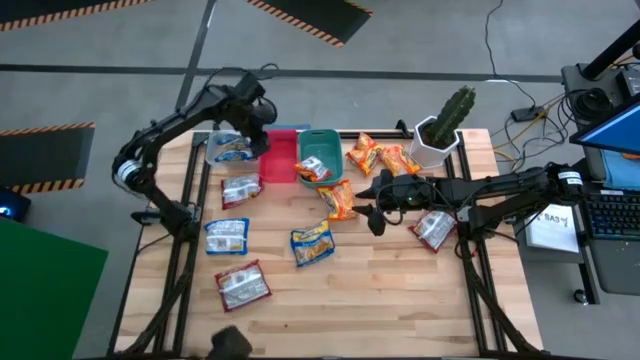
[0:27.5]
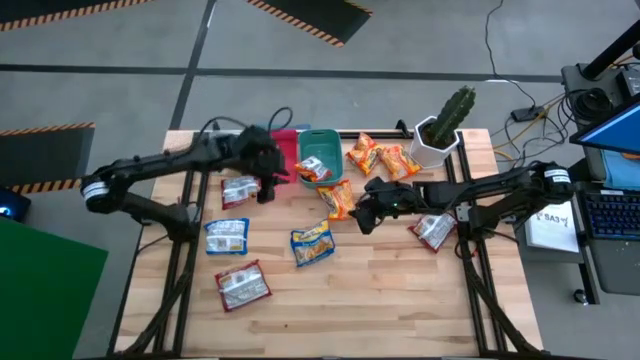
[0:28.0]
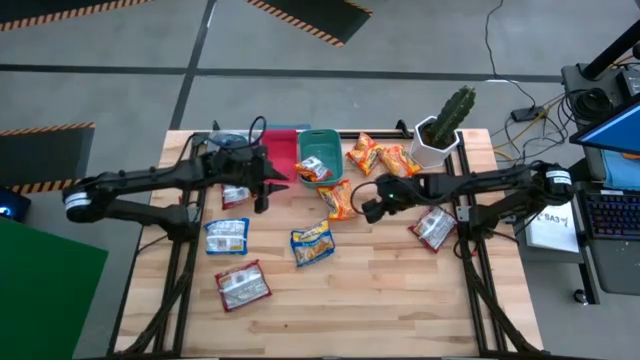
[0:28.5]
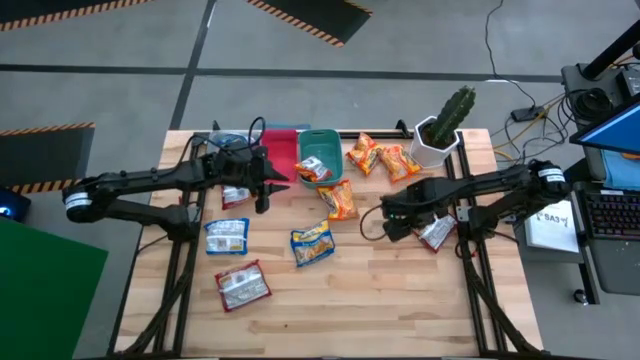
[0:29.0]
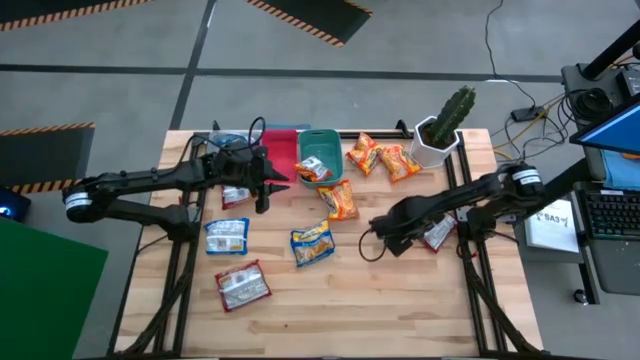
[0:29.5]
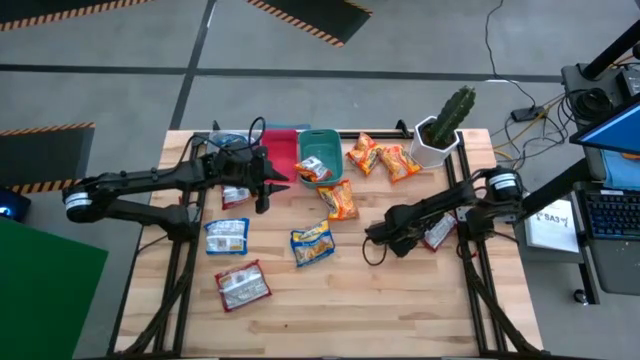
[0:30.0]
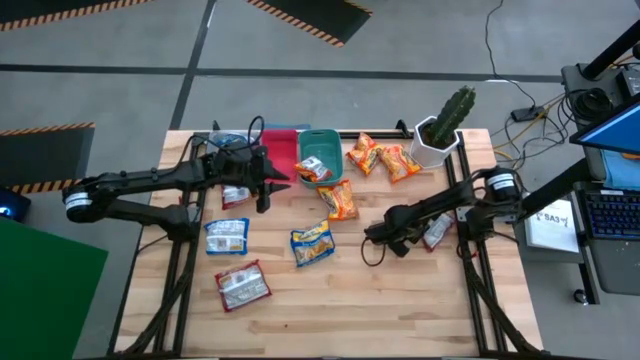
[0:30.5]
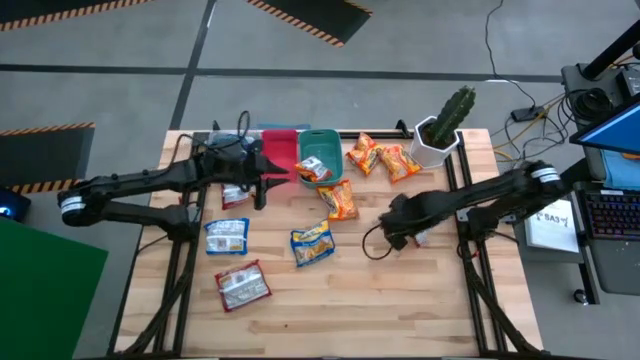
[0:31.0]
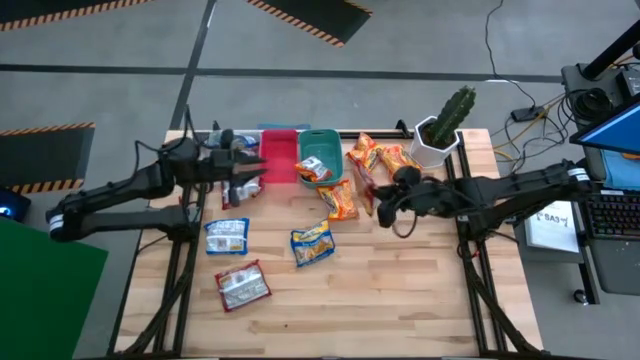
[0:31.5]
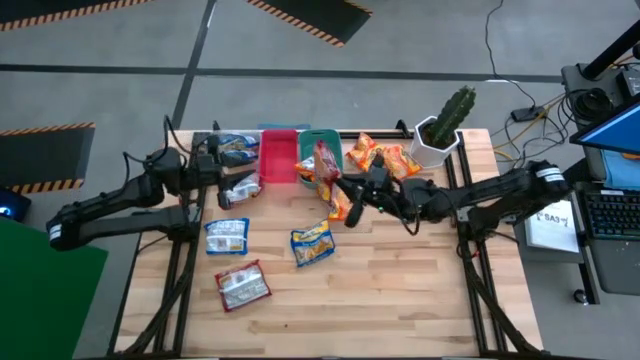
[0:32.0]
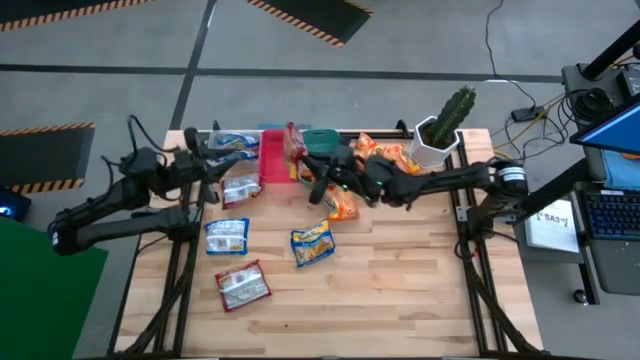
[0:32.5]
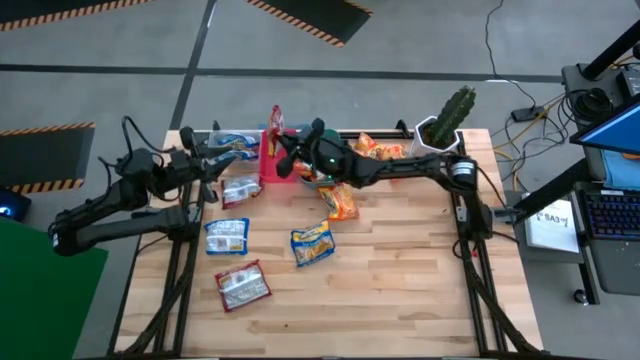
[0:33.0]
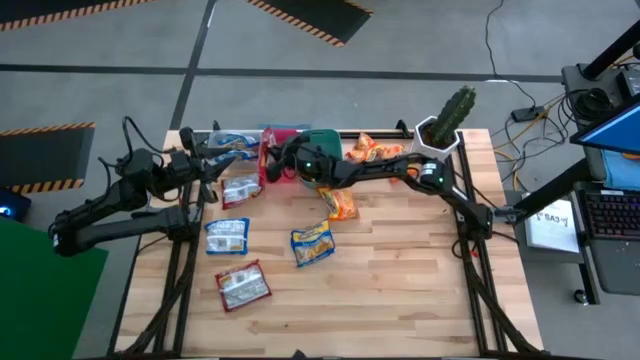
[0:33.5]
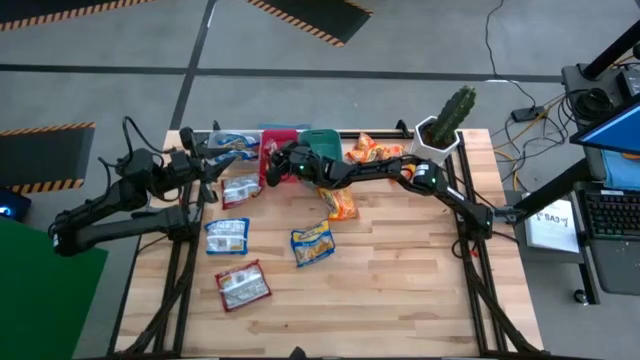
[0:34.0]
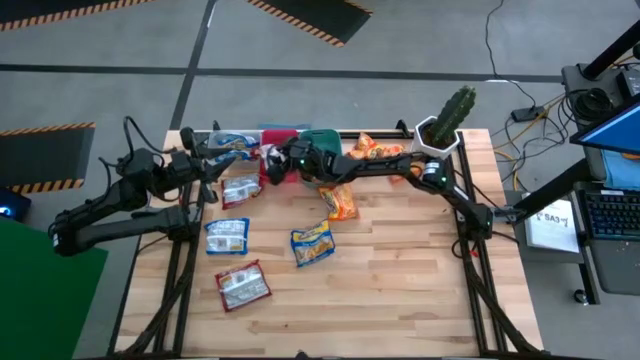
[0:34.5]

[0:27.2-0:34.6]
Task: Sort Maruchan noodles
Put the red noodle pack into the red bin

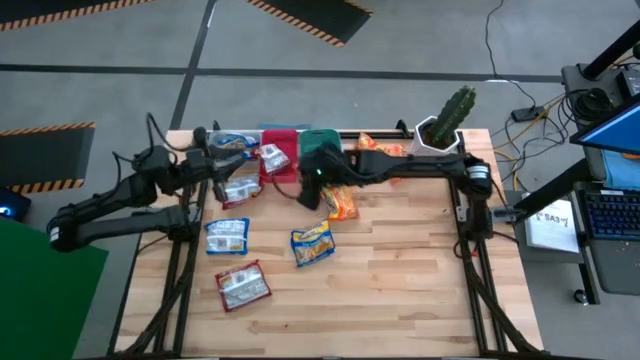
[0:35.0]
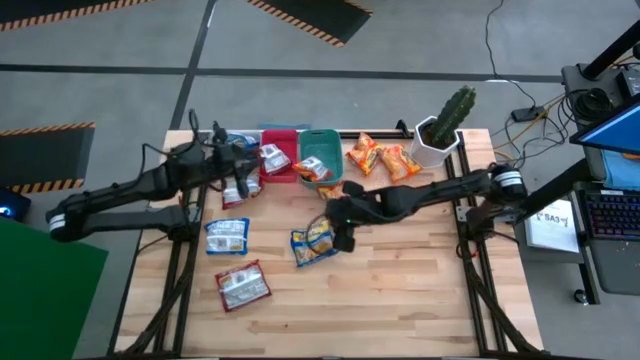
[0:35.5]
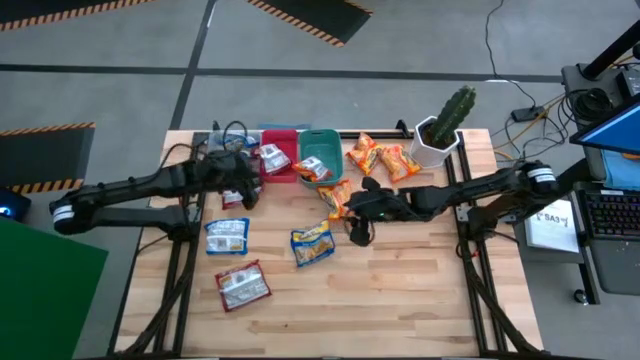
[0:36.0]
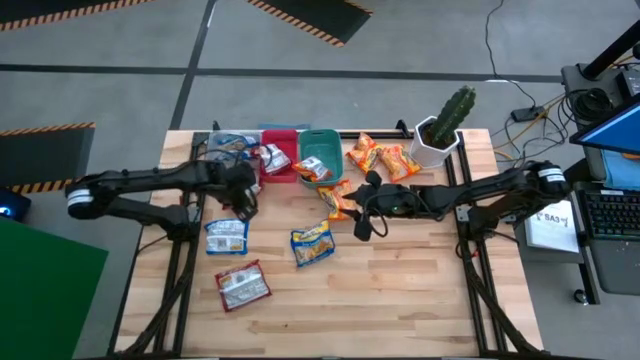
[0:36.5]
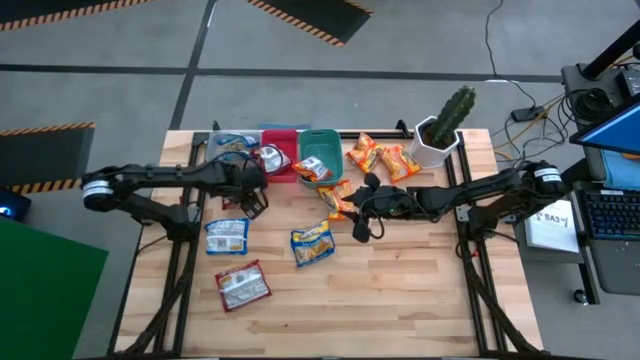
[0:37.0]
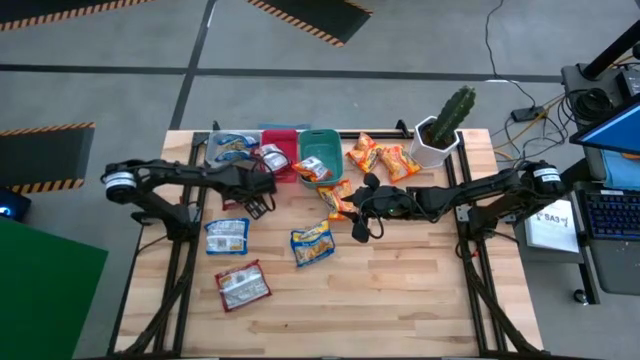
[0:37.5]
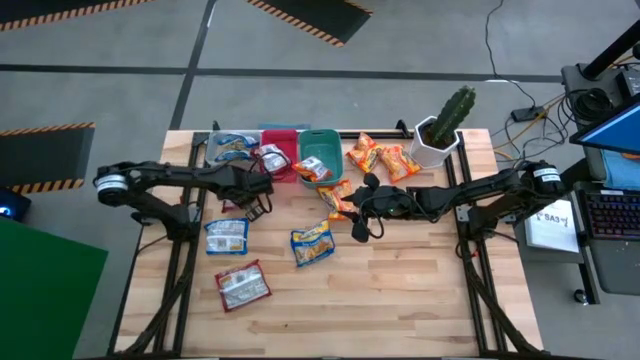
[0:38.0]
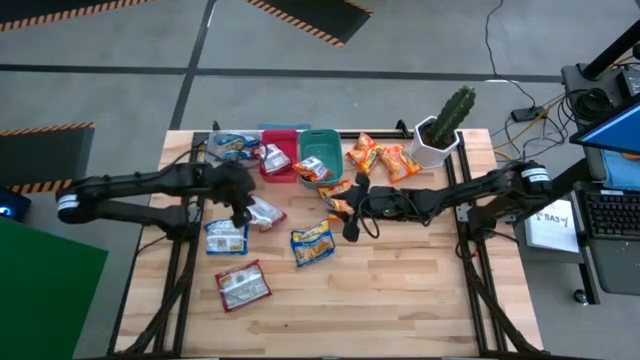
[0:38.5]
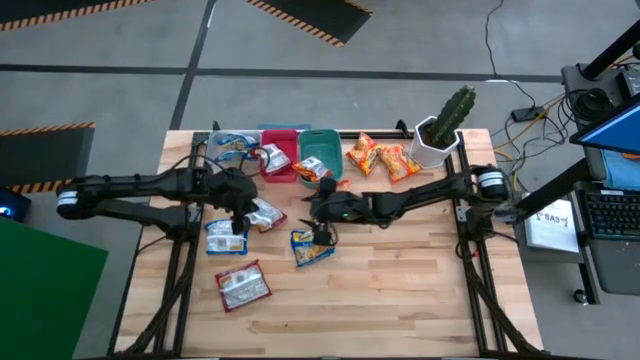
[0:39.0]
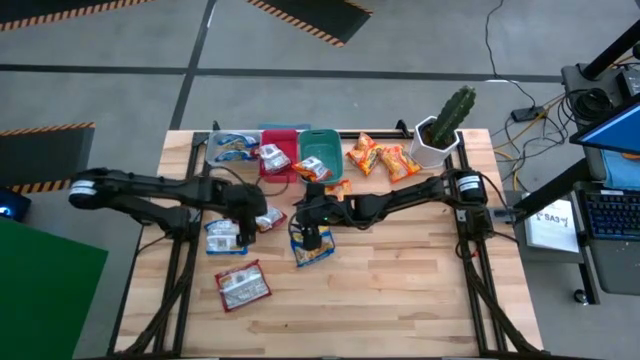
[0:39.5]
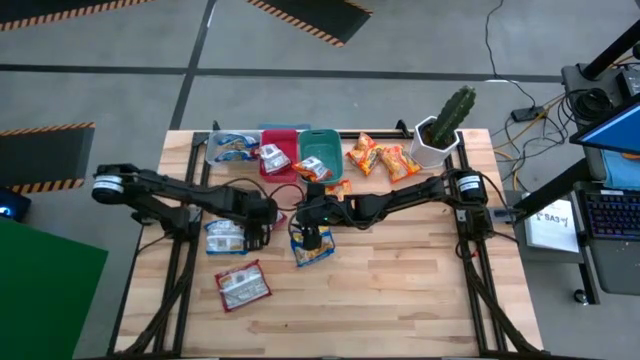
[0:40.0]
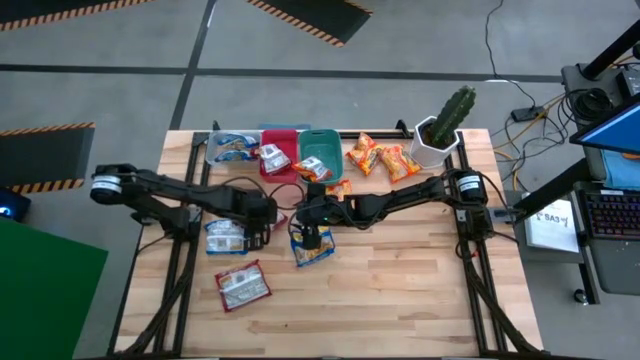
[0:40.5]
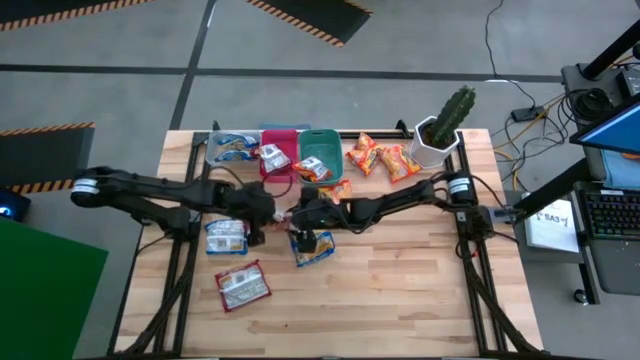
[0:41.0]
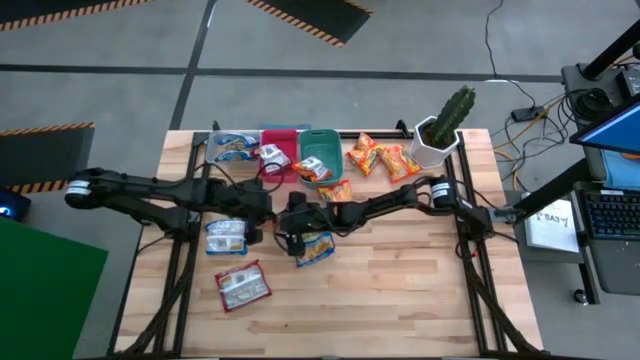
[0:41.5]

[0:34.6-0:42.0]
Put the red noodle pack into the red bin

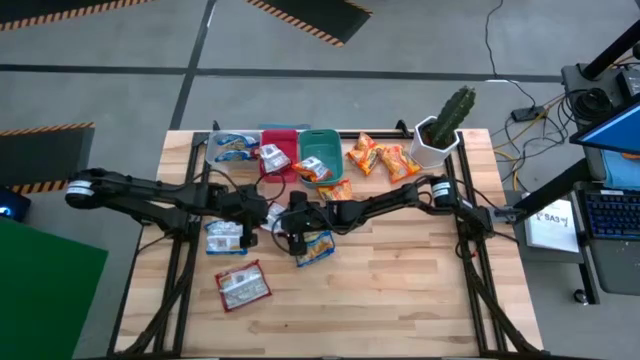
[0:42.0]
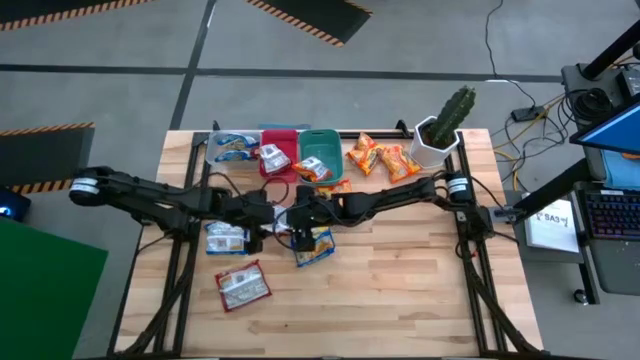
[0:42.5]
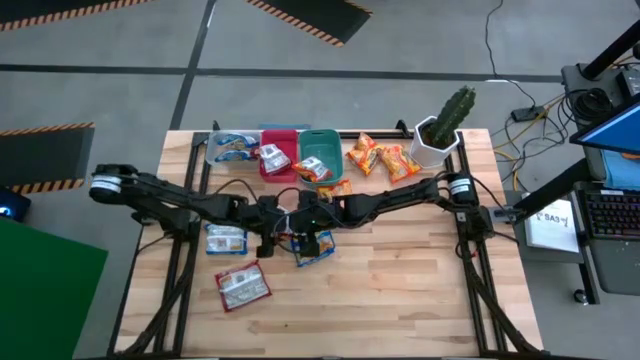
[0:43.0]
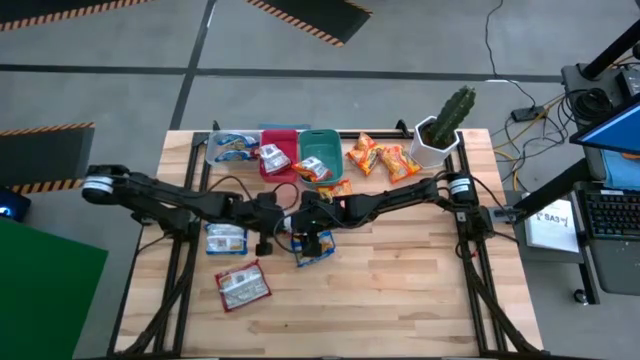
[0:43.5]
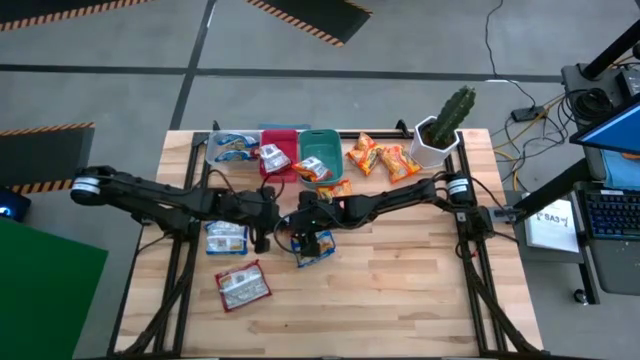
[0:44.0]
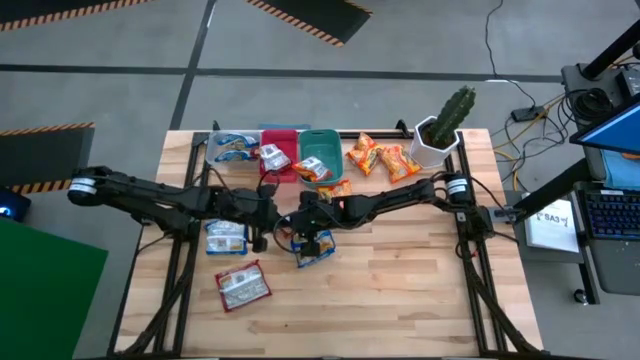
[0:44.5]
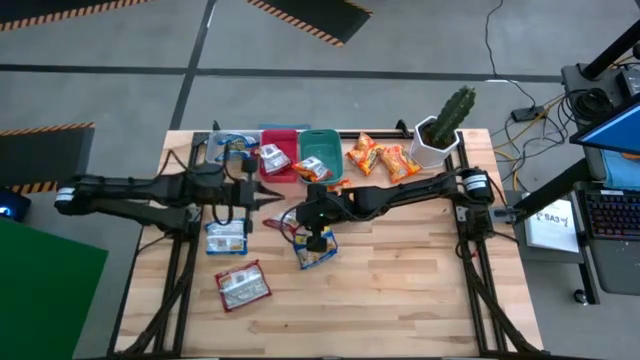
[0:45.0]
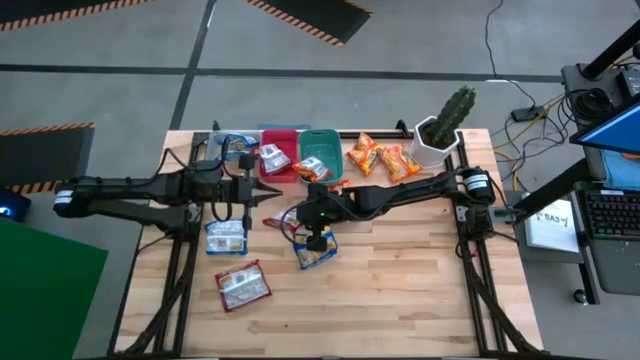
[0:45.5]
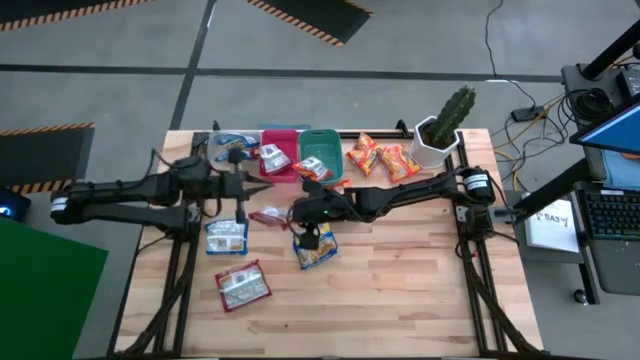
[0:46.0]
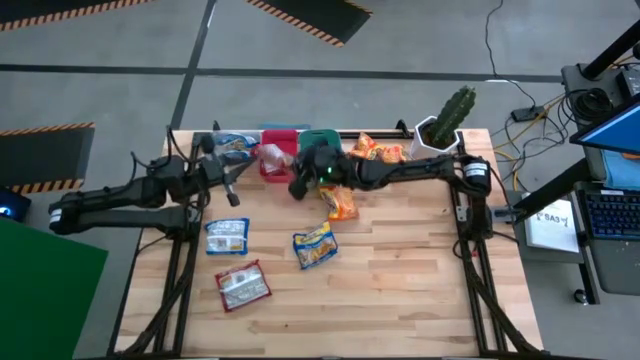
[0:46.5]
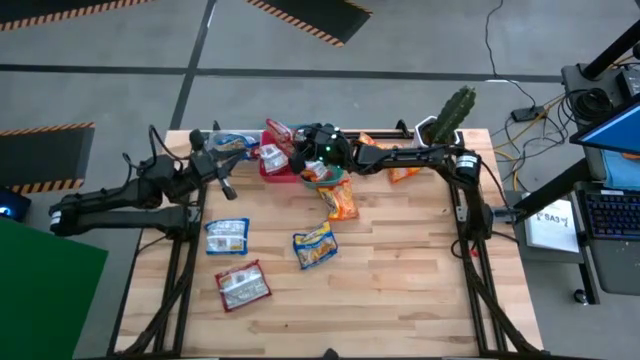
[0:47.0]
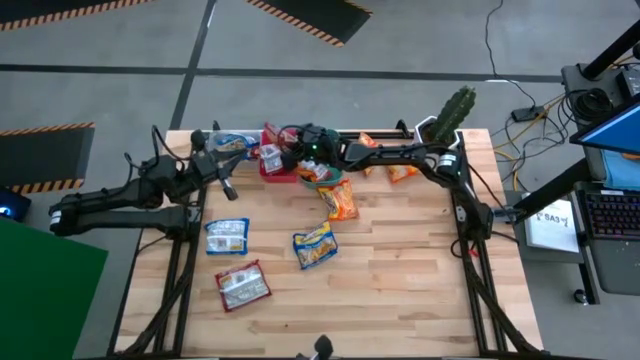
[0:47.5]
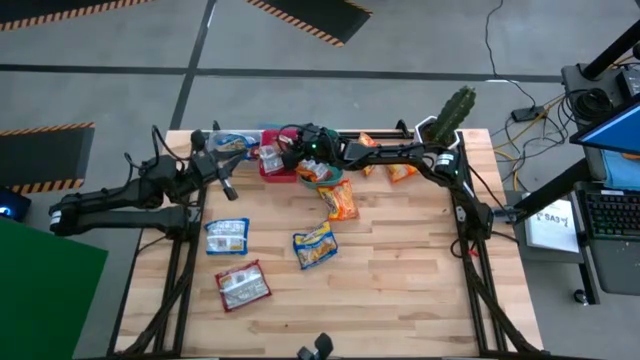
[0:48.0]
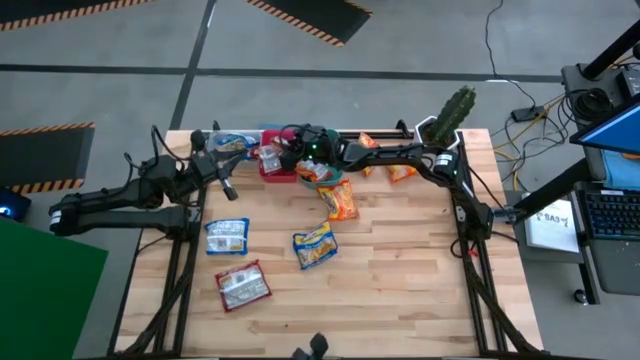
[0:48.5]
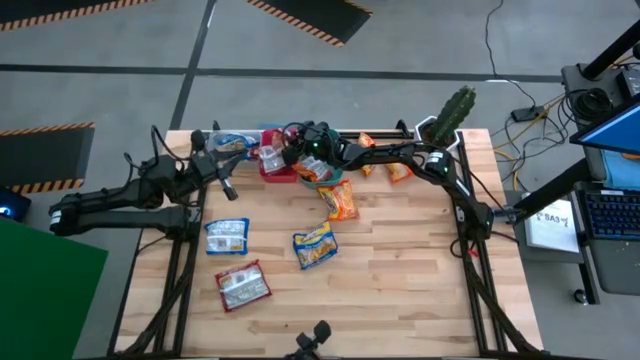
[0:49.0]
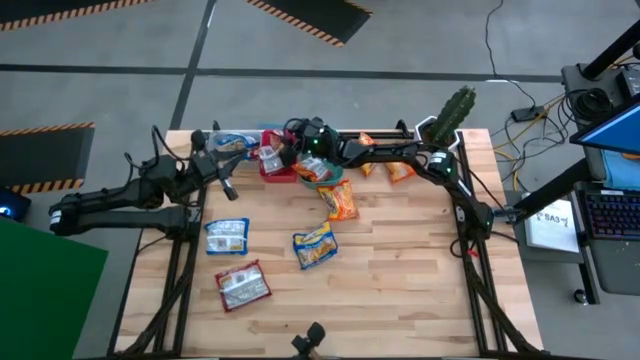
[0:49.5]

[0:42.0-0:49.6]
Put the red noodle pack into the red bin
